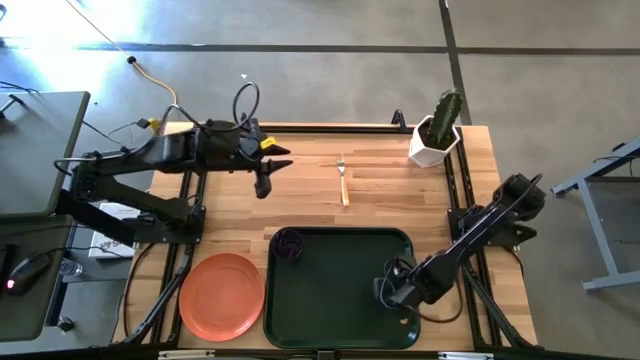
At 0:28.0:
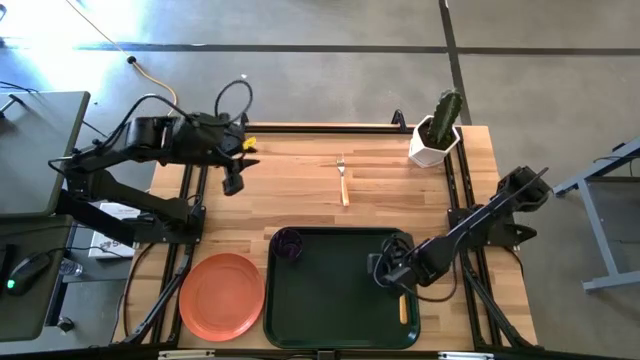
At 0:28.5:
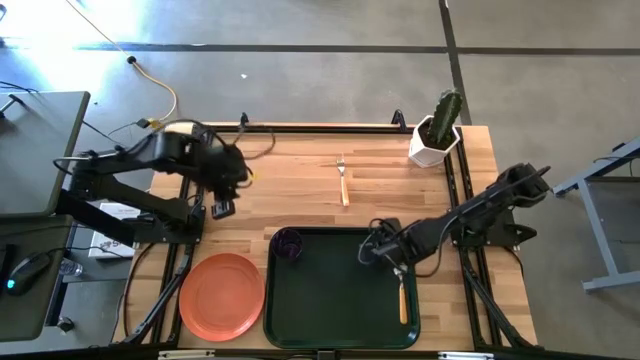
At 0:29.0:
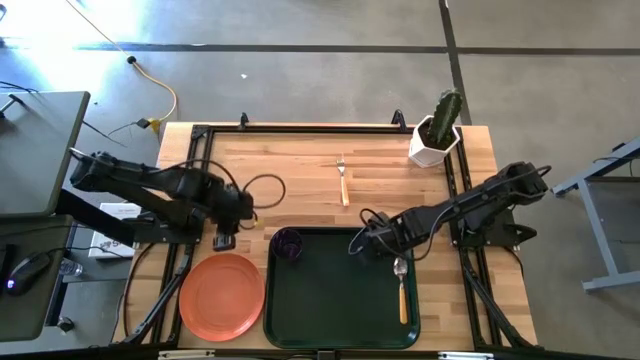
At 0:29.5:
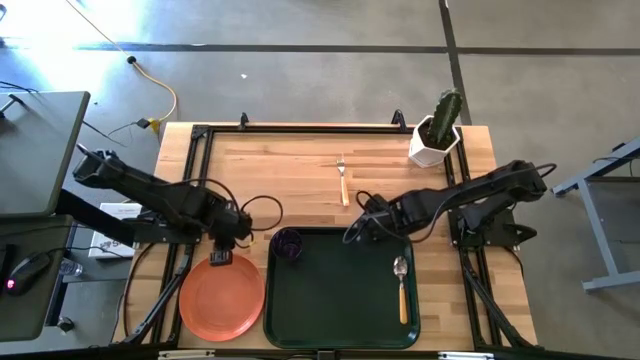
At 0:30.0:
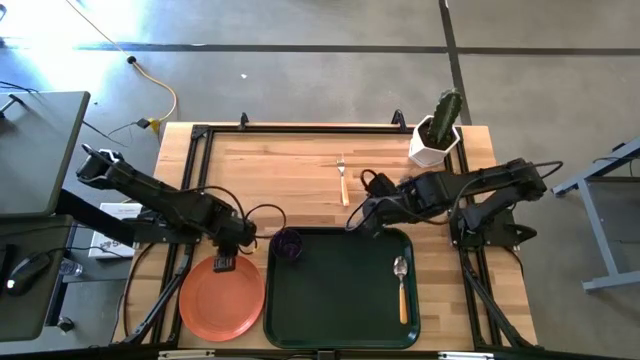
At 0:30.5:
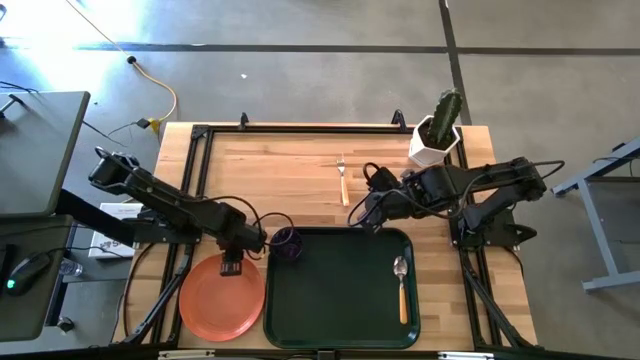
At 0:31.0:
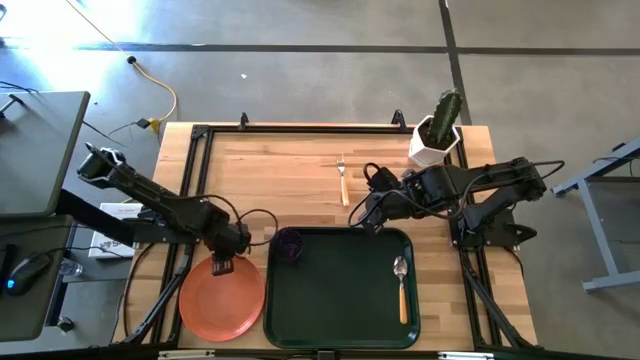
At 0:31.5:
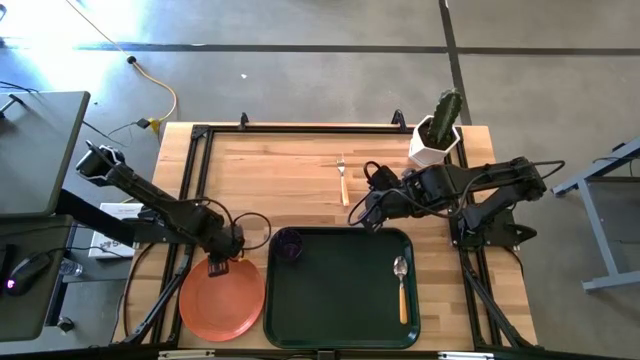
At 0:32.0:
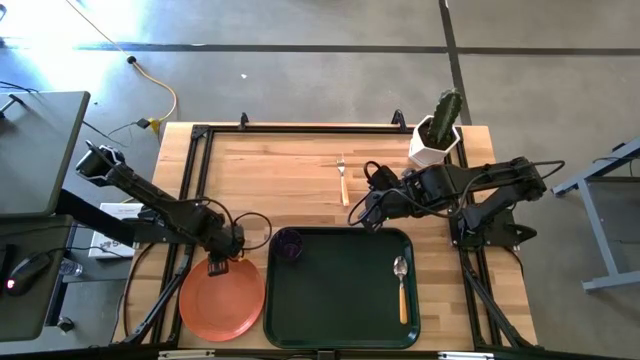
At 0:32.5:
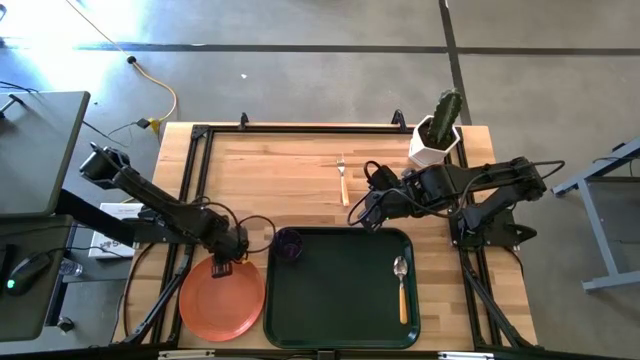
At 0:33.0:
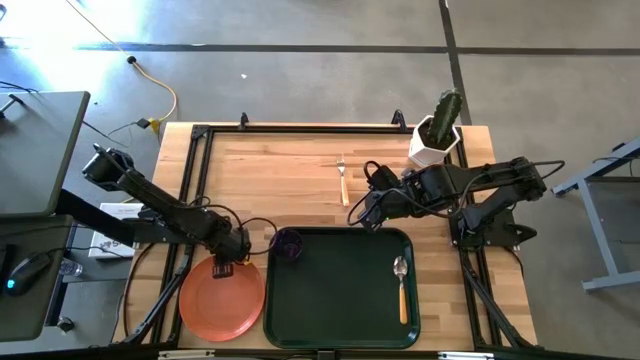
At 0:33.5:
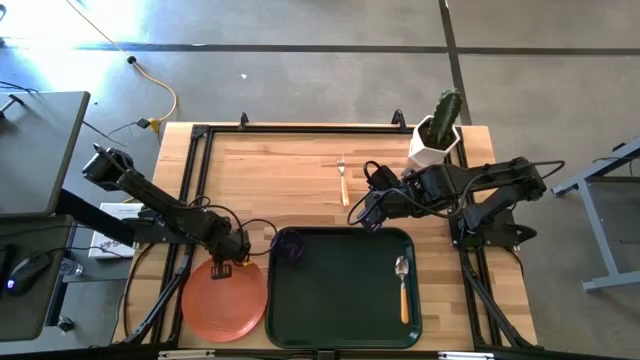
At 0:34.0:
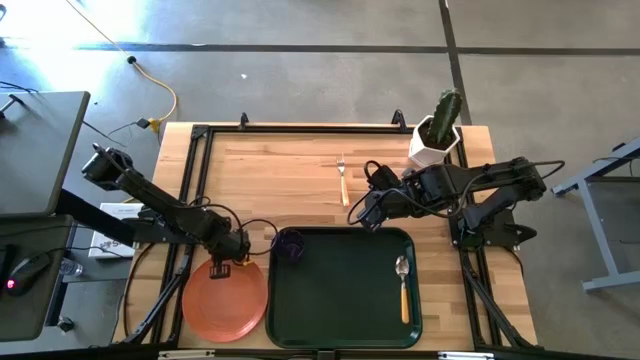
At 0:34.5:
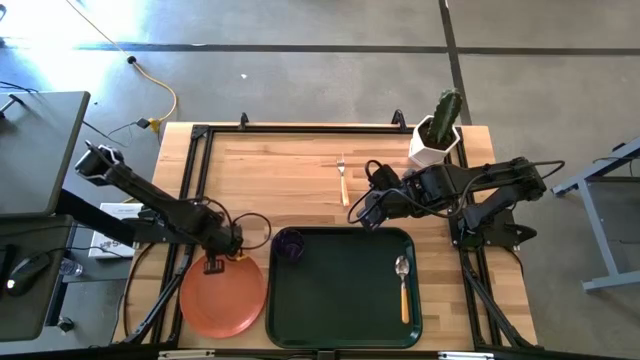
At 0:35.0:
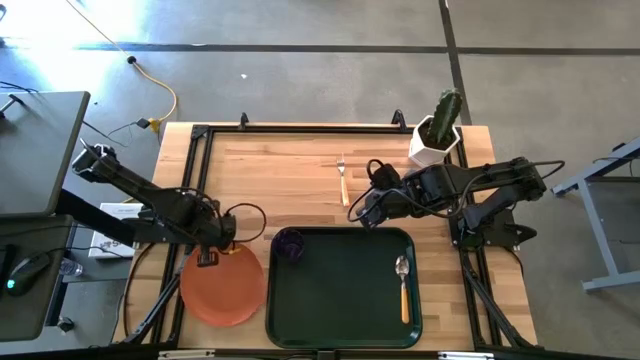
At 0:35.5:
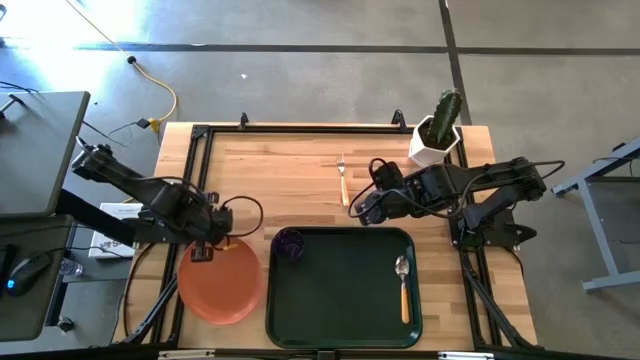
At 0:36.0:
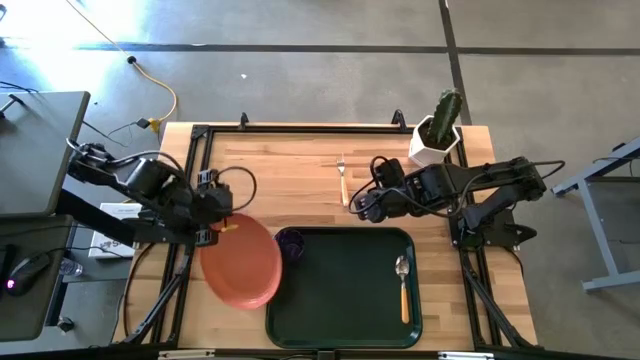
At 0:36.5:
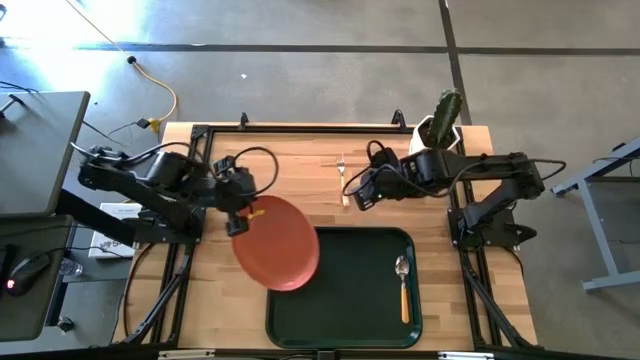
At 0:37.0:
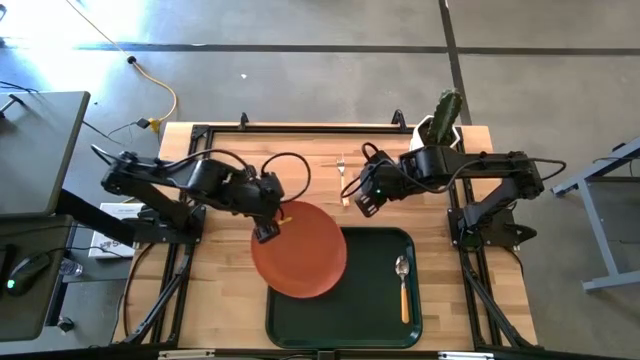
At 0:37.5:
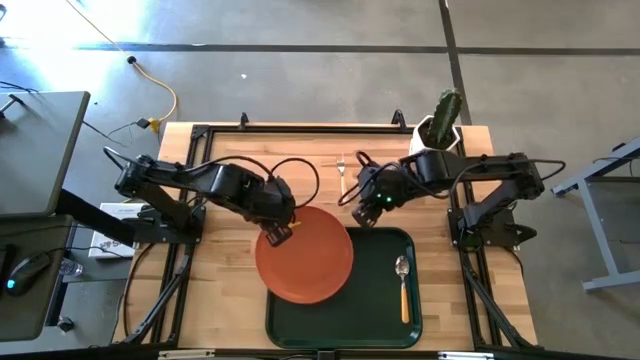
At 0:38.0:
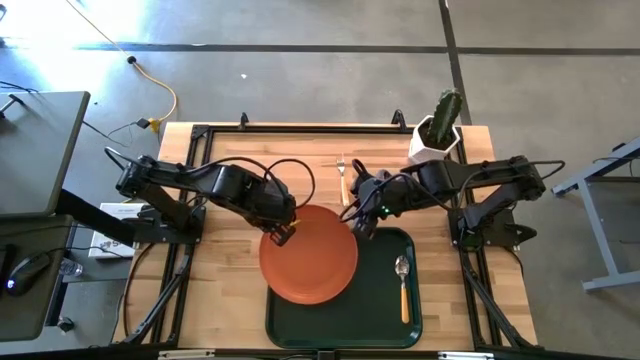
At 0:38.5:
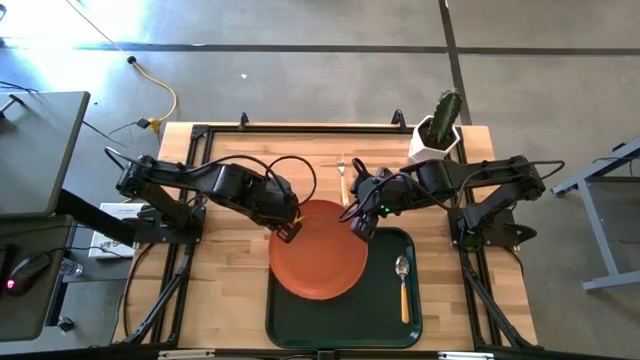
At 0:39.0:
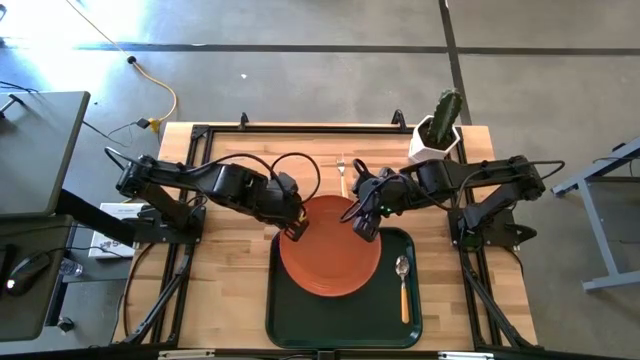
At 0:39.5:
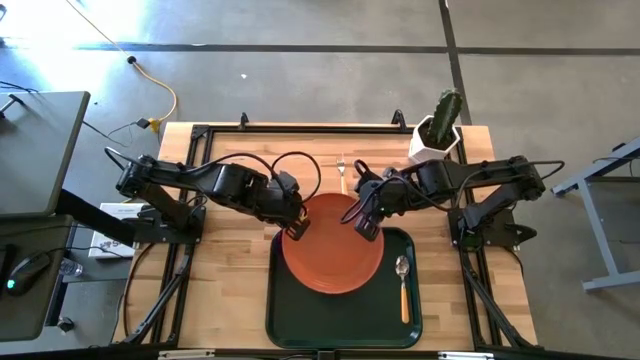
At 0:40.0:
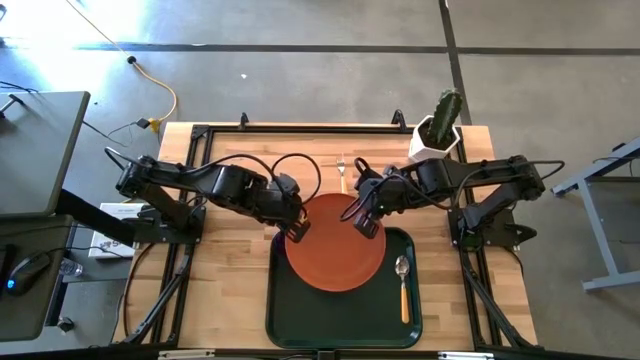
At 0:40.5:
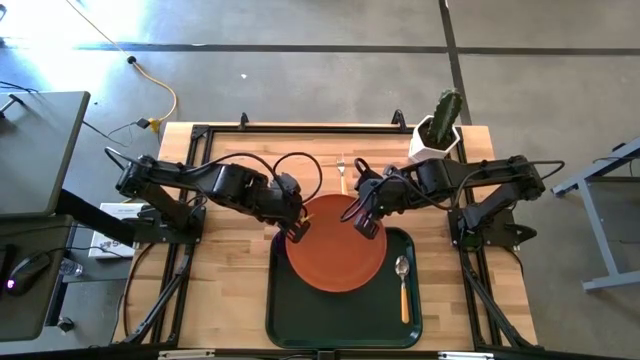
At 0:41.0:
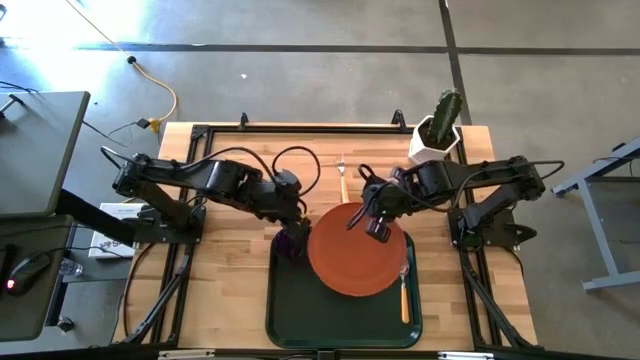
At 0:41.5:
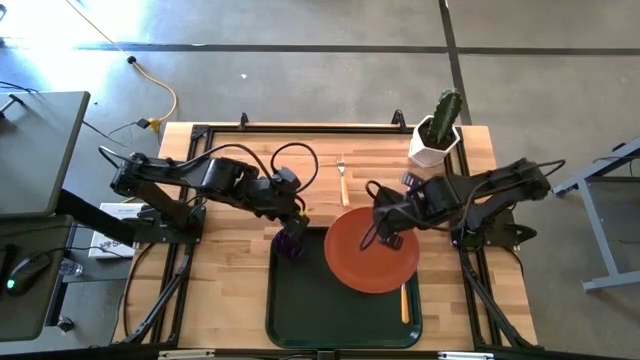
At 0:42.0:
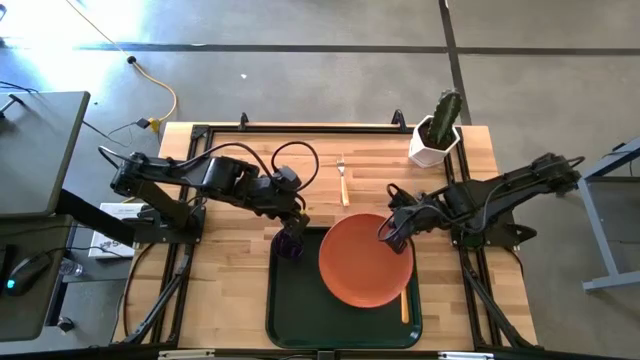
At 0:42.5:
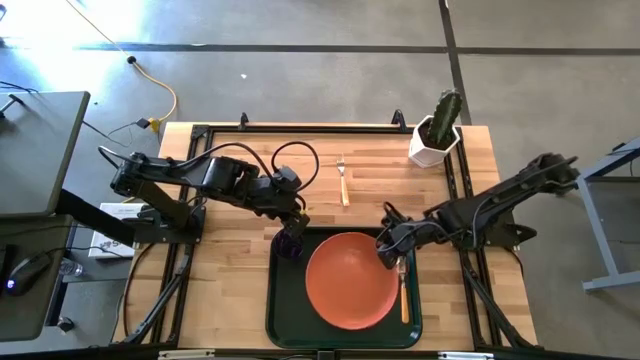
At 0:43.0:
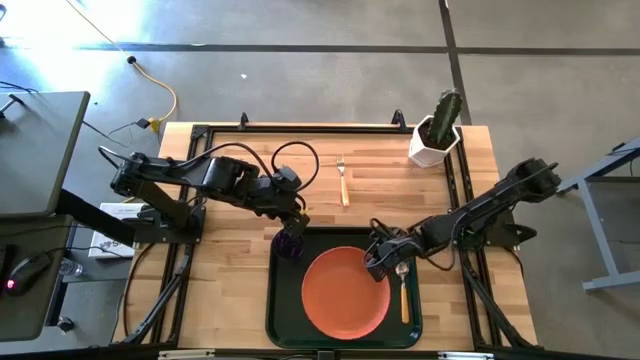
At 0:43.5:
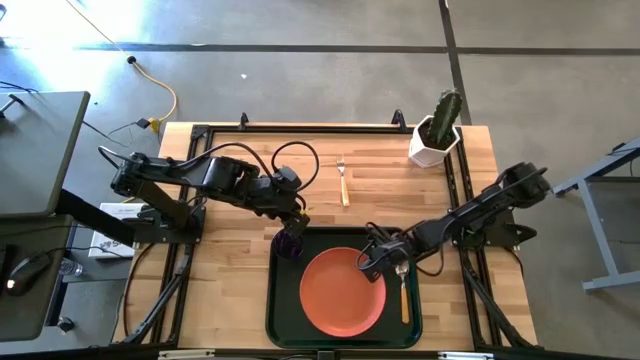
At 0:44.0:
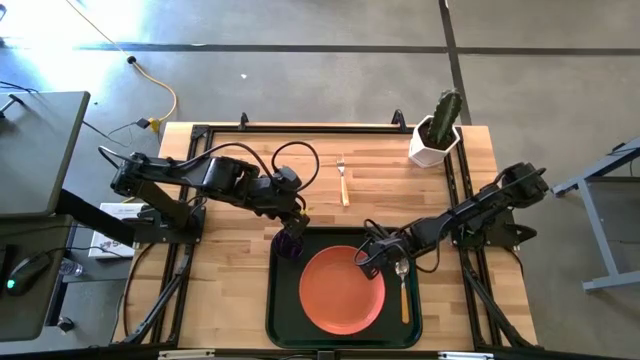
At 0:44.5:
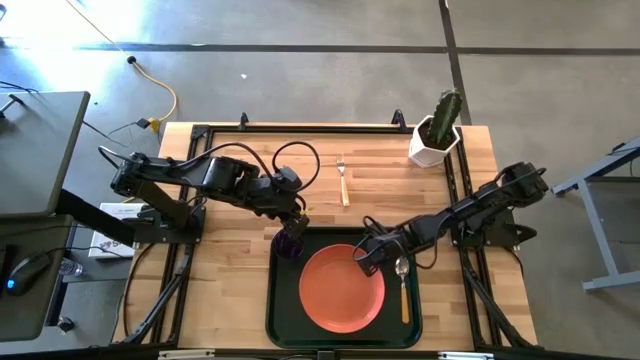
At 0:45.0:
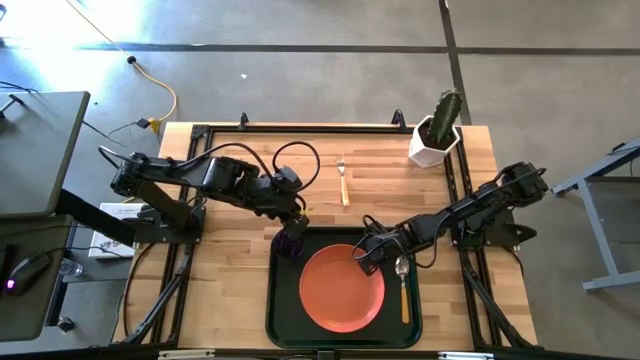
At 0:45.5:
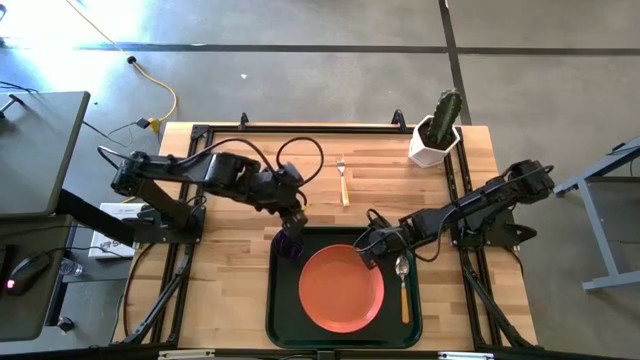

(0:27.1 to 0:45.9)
Task: Pick and place plate/cup/fork/spoon on tray
Put the orange plate on the dark green tray

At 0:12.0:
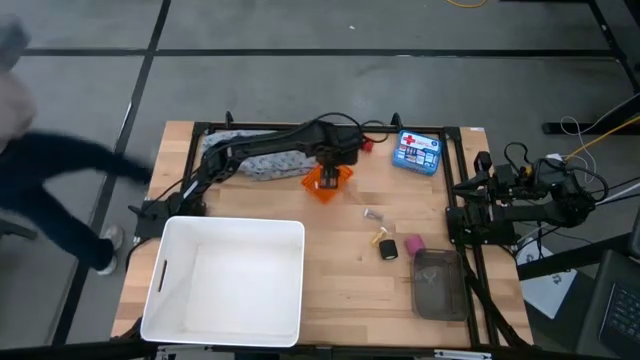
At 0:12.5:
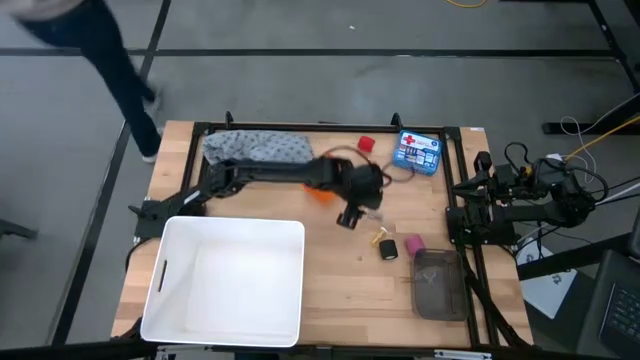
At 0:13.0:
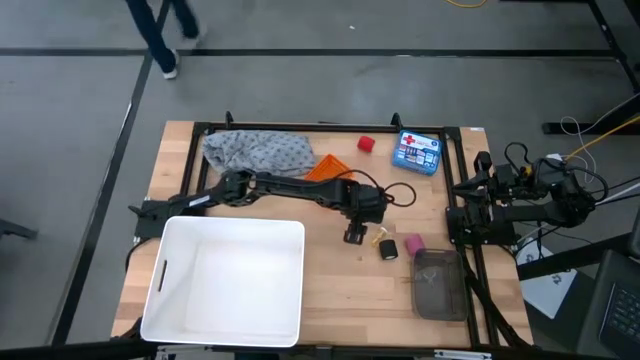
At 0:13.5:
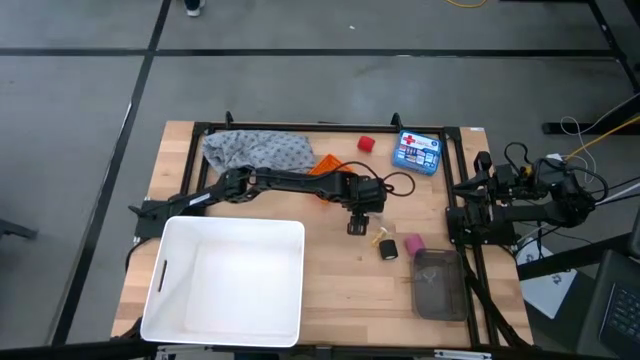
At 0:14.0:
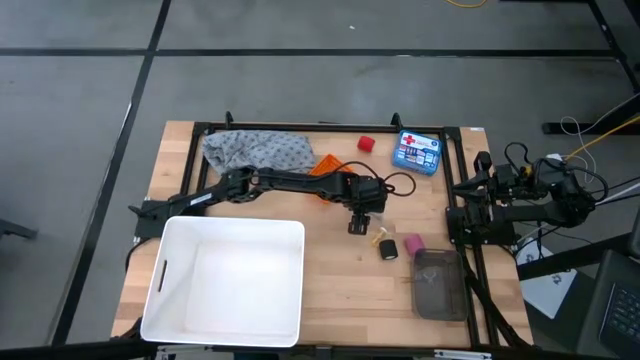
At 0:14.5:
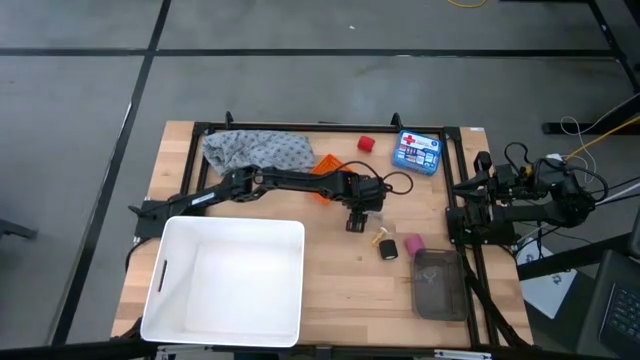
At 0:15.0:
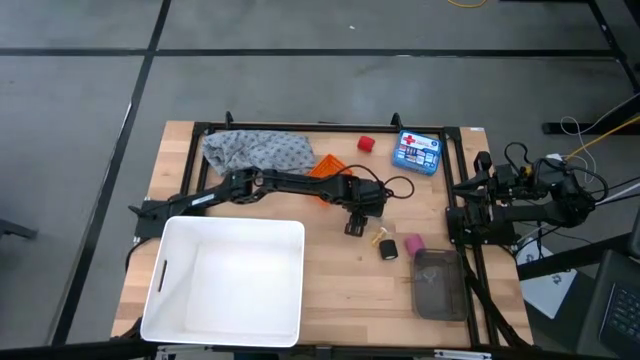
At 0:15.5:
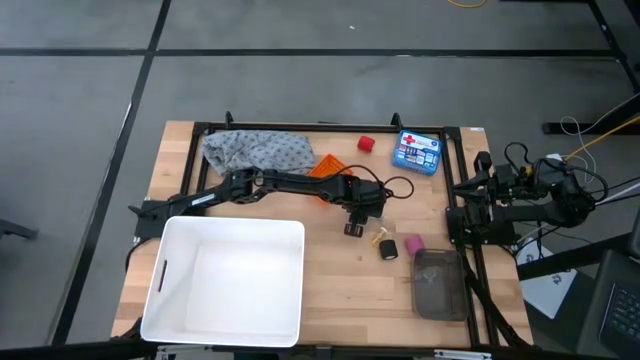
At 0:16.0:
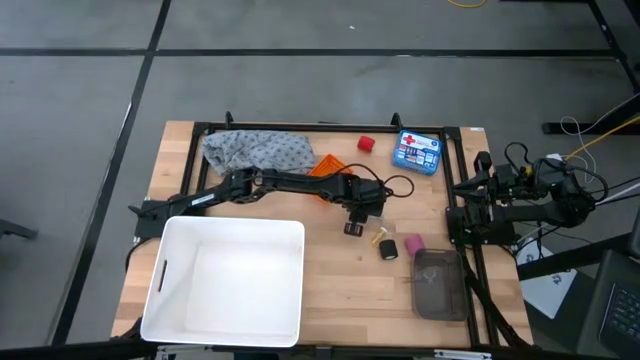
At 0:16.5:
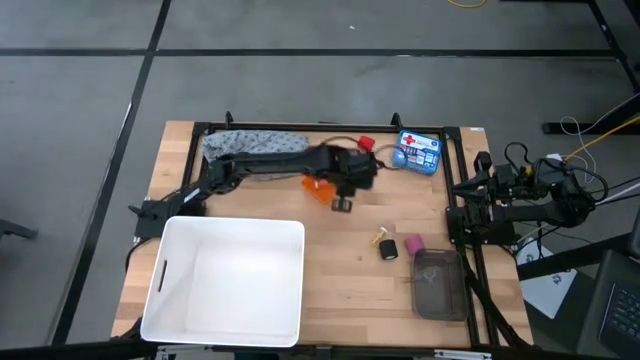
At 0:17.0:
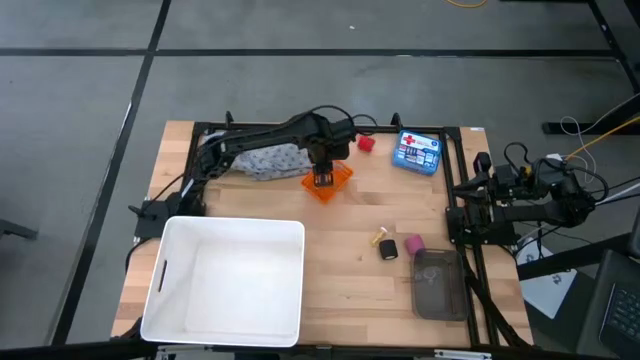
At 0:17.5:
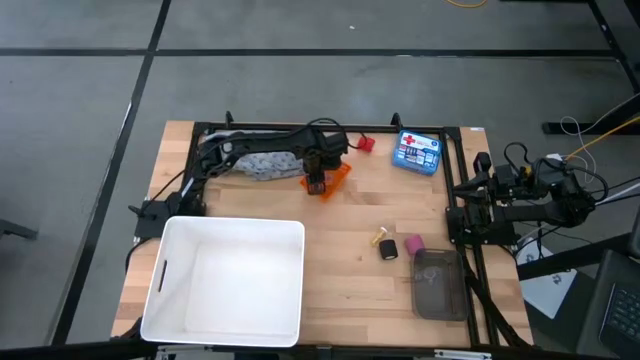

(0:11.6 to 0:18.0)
Task: Pick & place medical supplies in basket/bin
Put the light blue pill bottle into the orange bin
